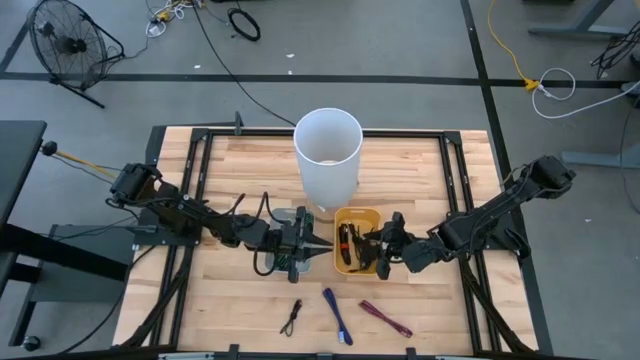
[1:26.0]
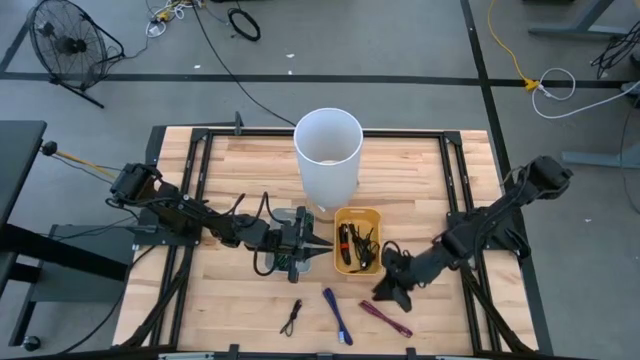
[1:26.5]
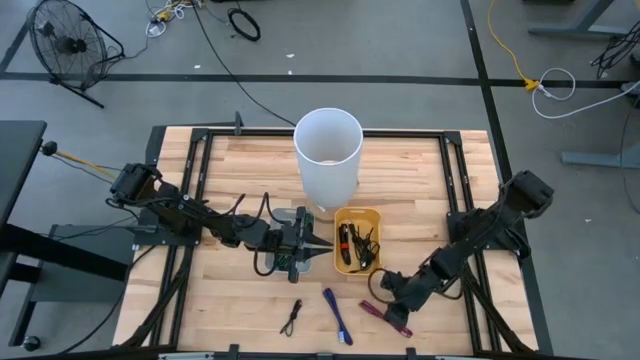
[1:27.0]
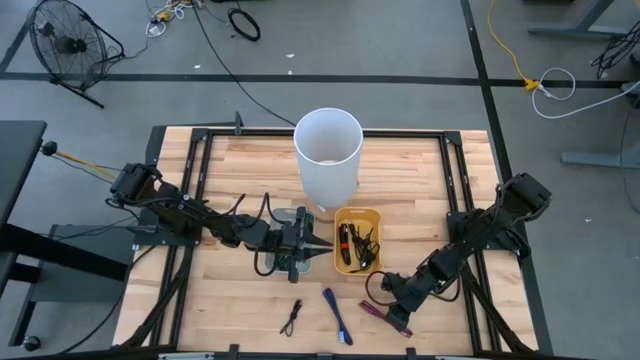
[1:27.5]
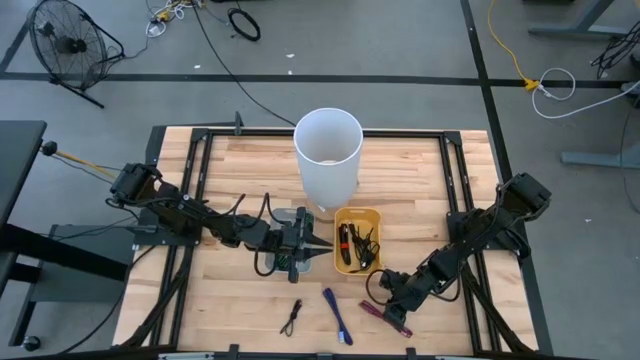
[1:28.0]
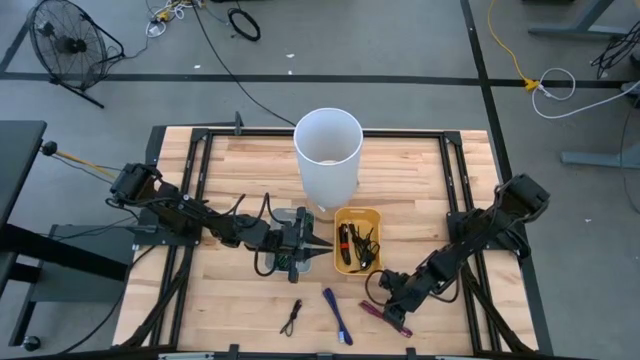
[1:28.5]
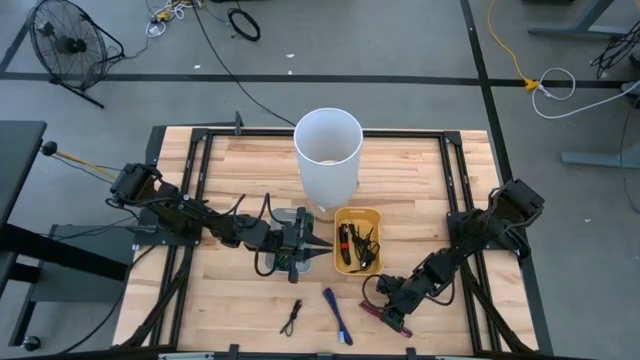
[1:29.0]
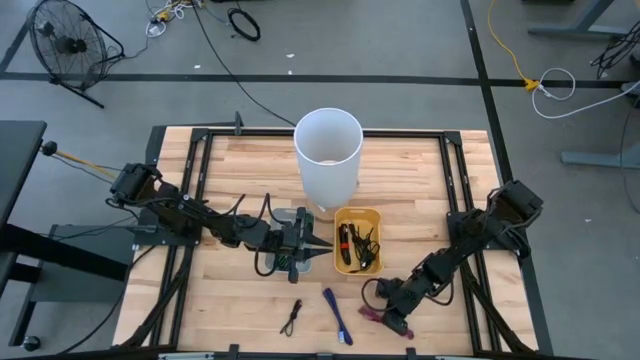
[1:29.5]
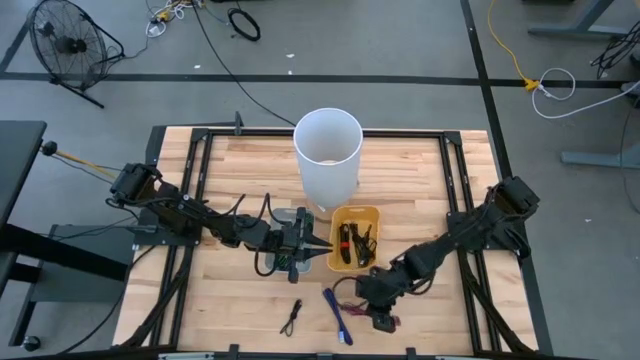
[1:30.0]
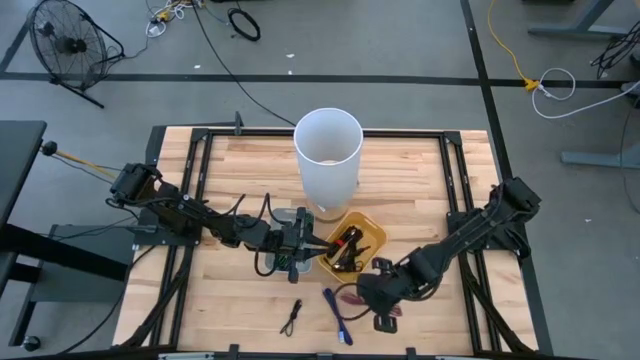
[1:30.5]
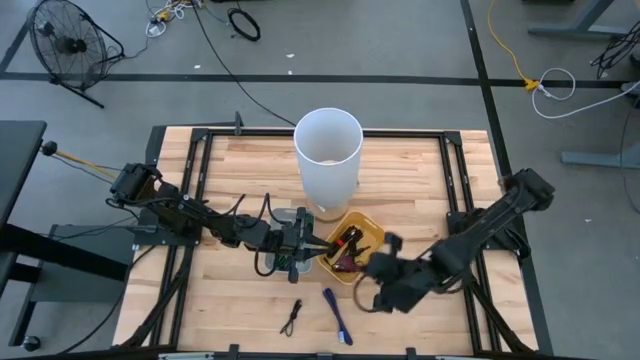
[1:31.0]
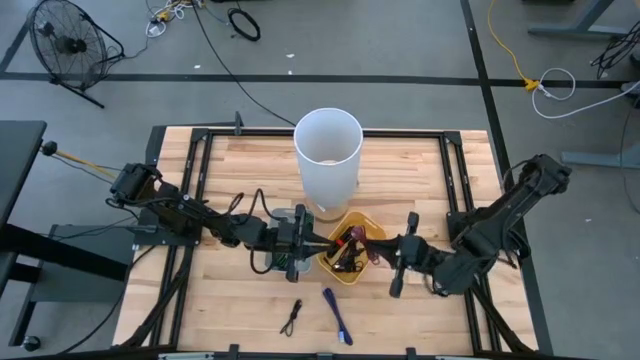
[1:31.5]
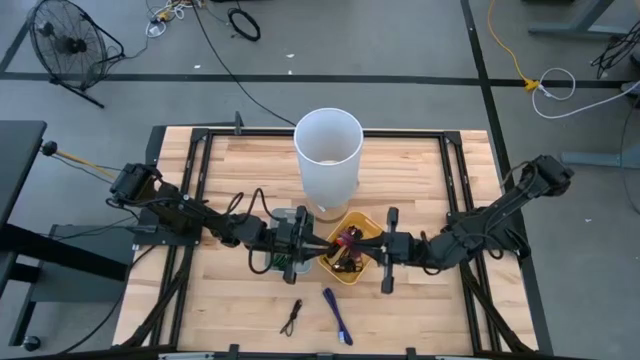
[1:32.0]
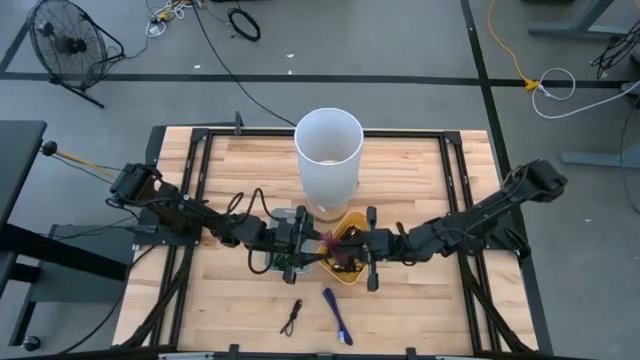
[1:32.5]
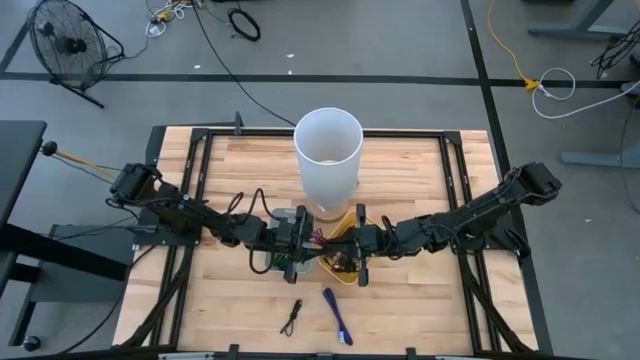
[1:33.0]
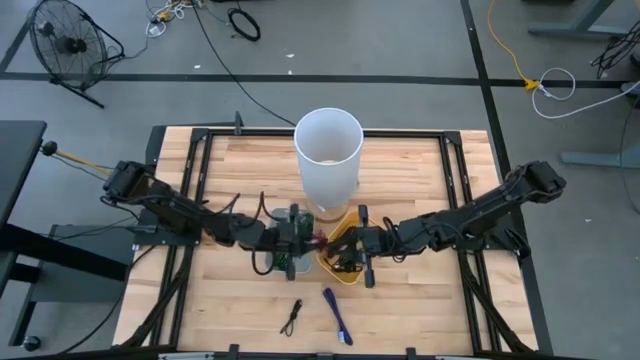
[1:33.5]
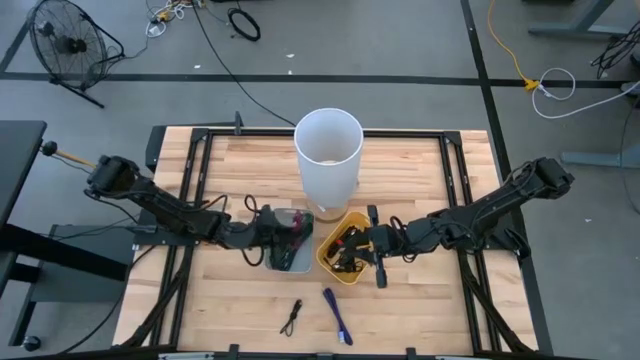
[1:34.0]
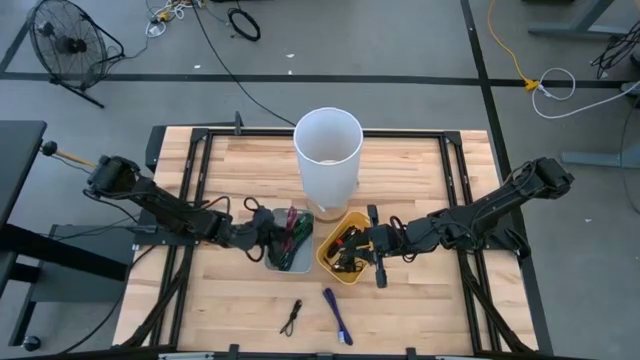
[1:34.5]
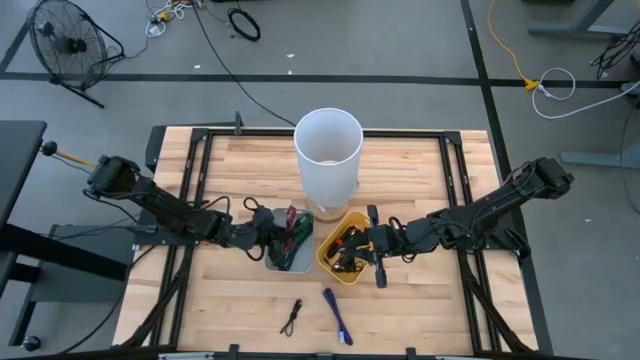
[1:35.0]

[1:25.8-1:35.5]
Task: Pick & Place USB Port
Put the pink charger cable into the gray bin

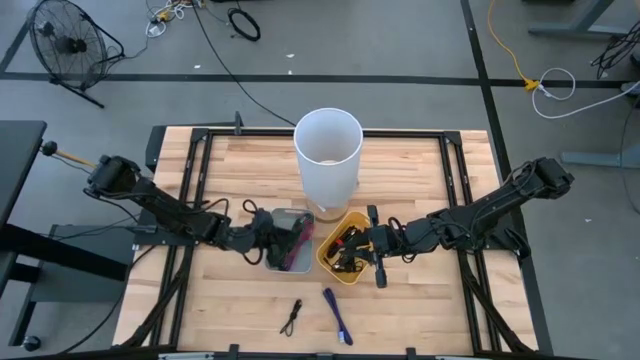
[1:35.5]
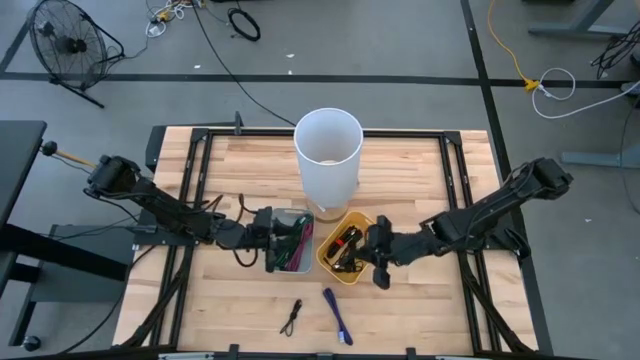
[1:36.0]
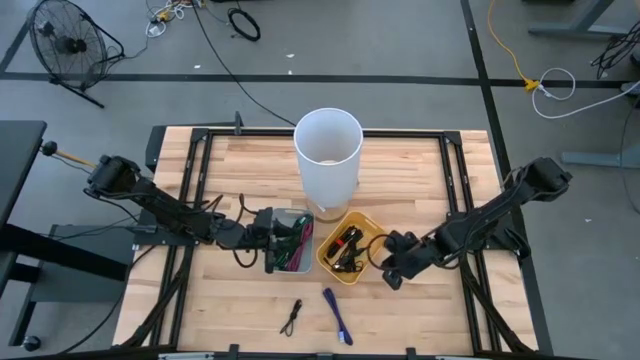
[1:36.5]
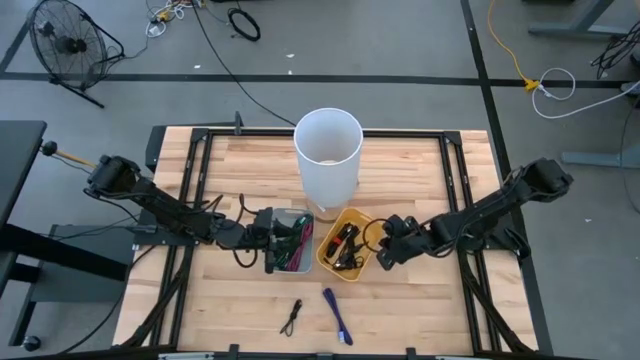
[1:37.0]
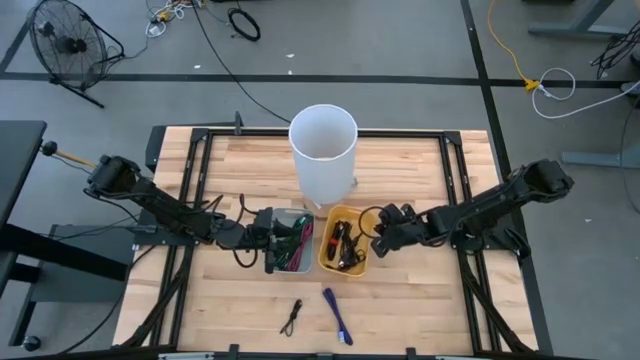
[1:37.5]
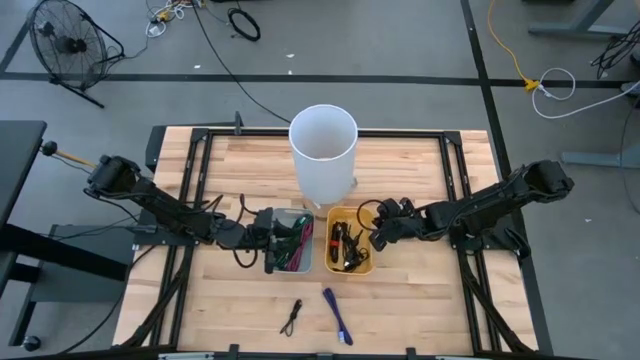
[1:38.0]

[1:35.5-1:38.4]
Adjust the yellow bin

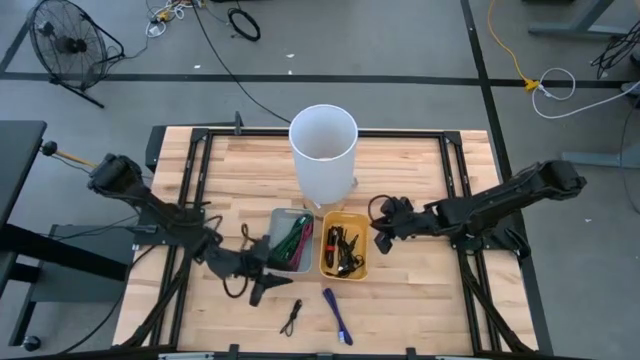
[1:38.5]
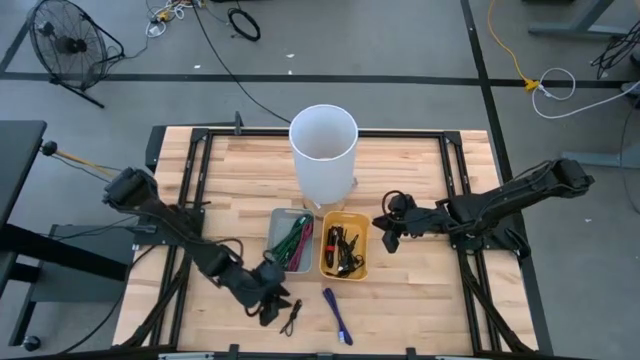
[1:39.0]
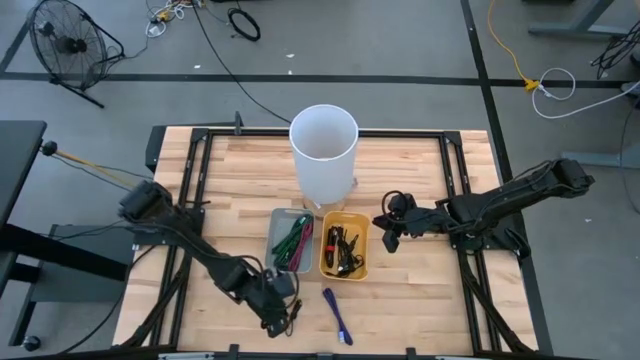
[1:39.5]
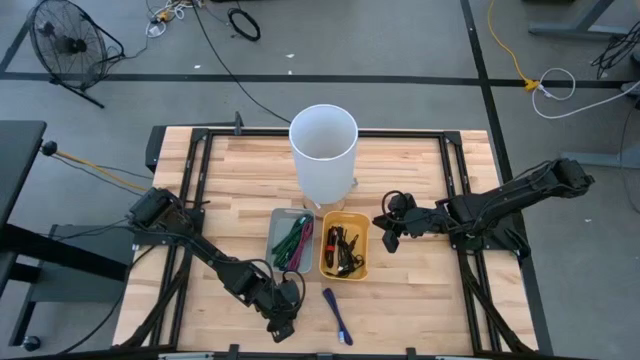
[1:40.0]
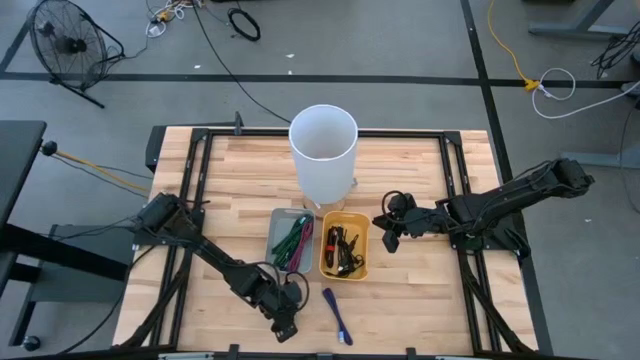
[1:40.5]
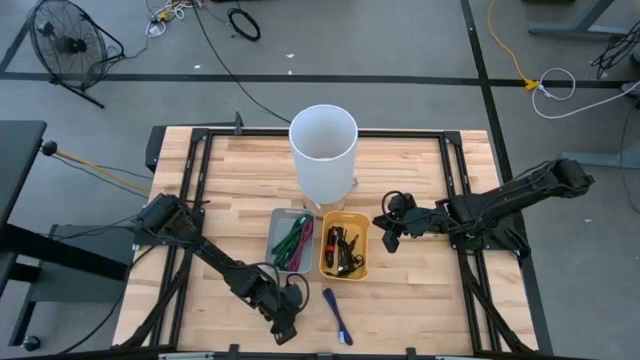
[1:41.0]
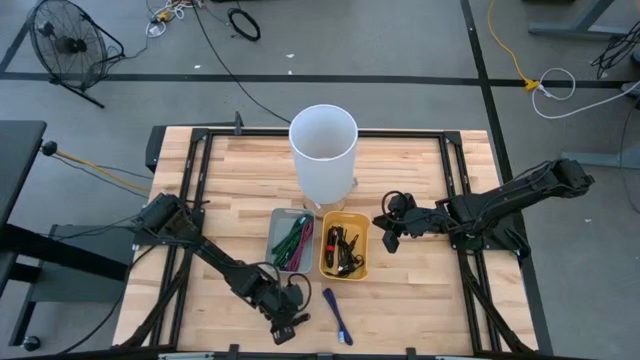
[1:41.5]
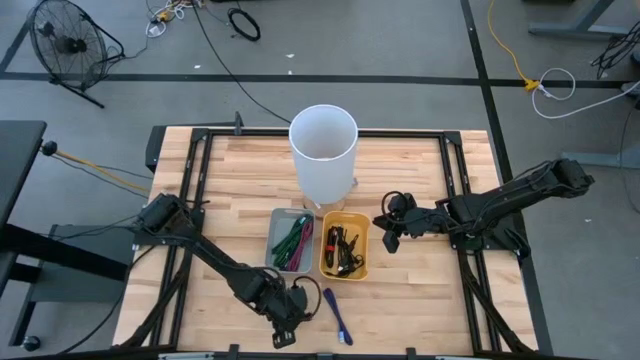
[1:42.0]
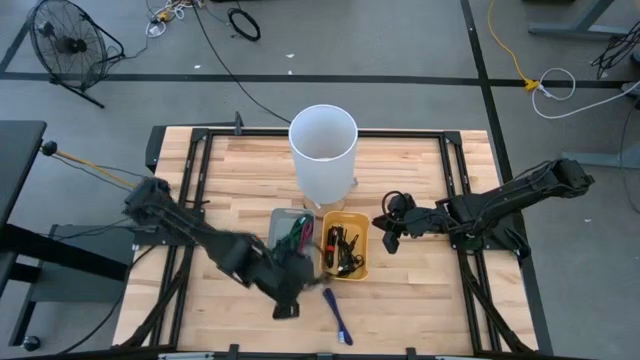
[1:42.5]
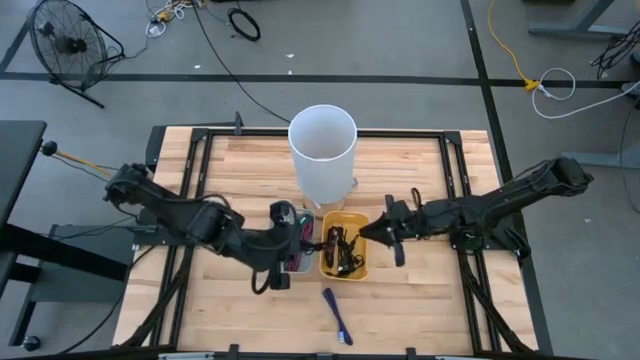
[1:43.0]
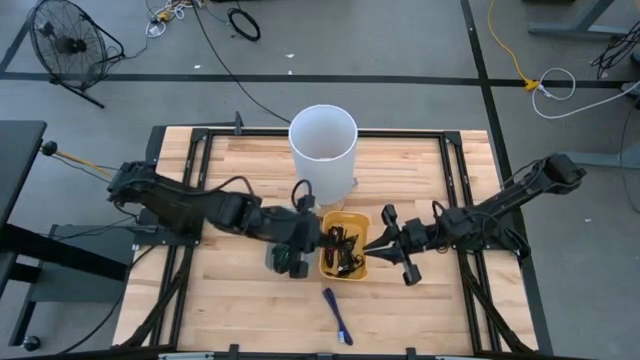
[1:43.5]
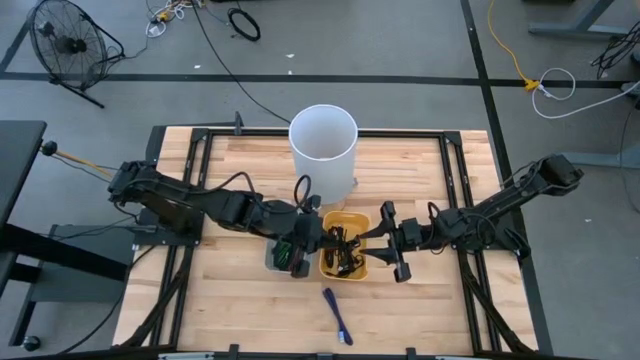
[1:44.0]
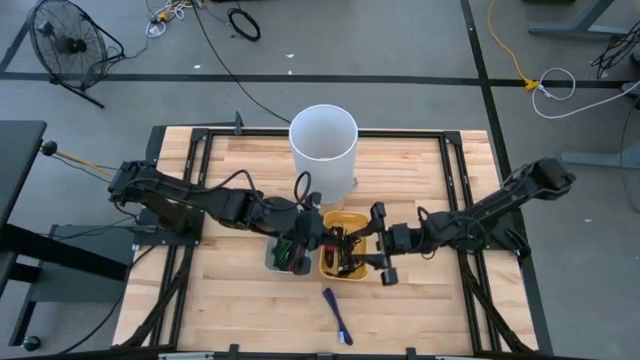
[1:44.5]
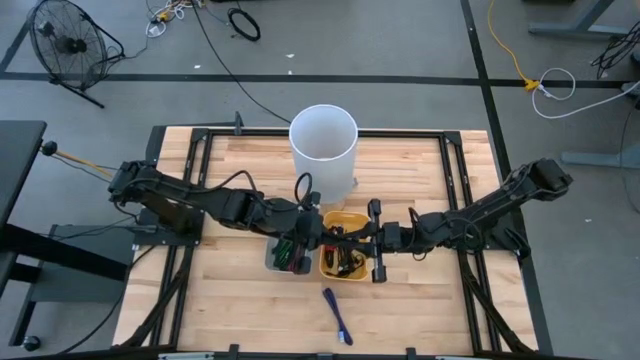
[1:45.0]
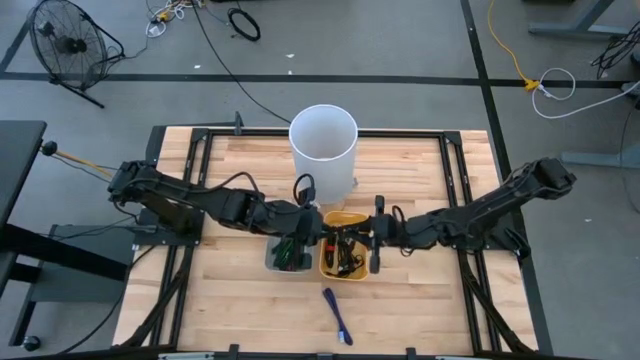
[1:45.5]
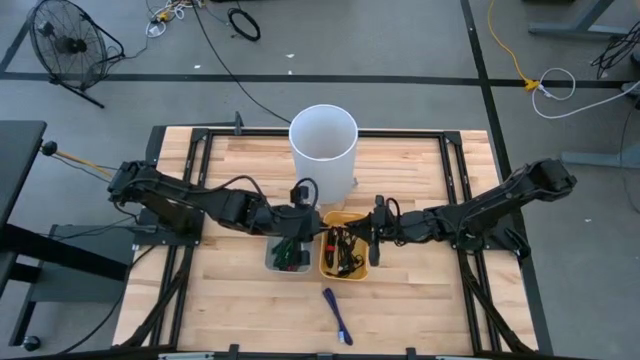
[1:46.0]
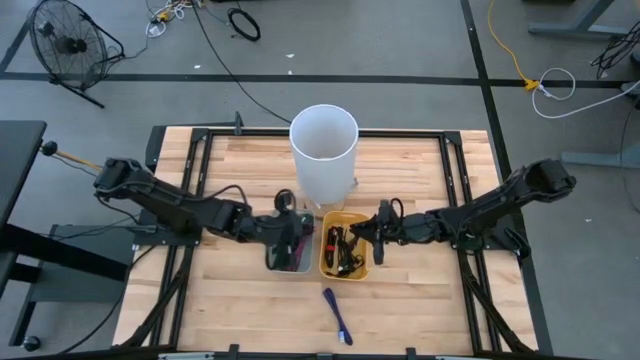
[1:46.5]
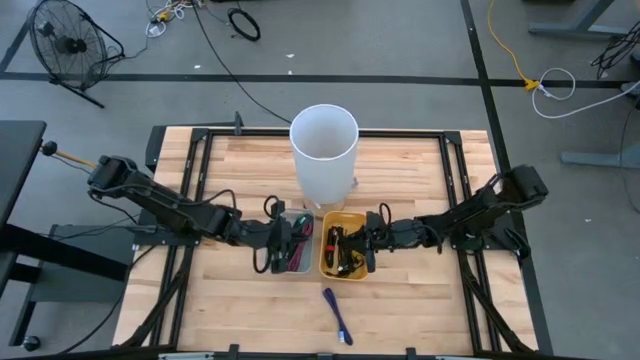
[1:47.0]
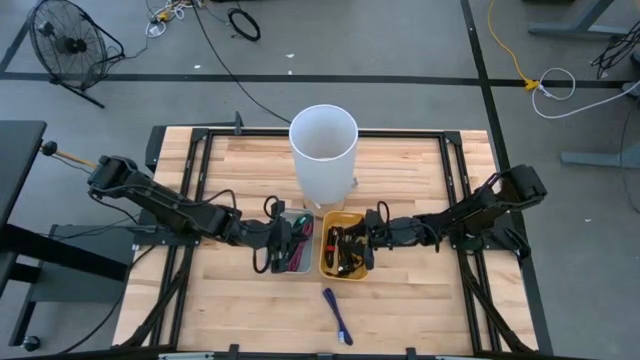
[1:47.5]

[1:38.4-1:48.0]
Put the black charger cable into the yellow bin
